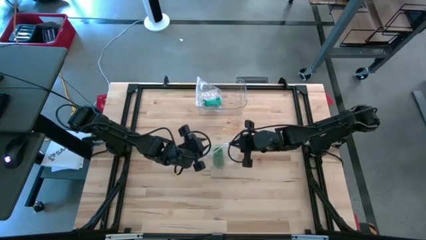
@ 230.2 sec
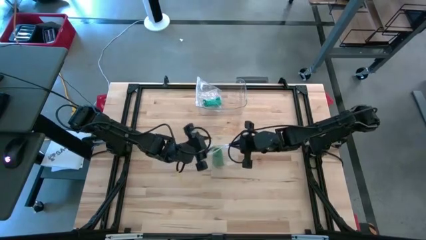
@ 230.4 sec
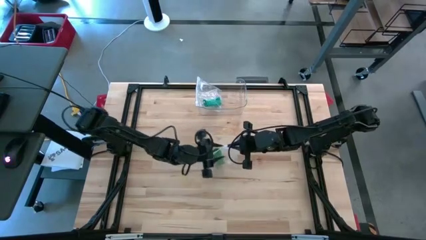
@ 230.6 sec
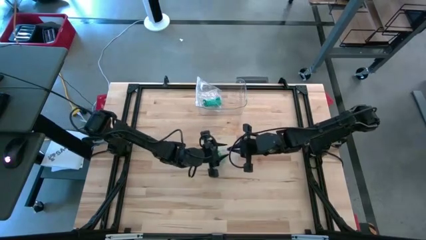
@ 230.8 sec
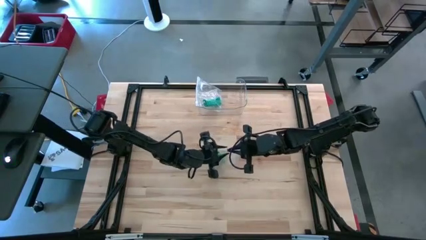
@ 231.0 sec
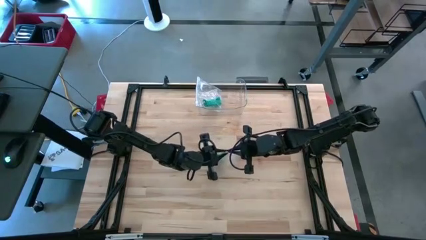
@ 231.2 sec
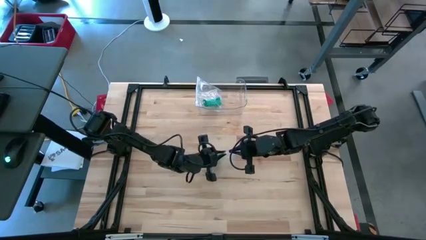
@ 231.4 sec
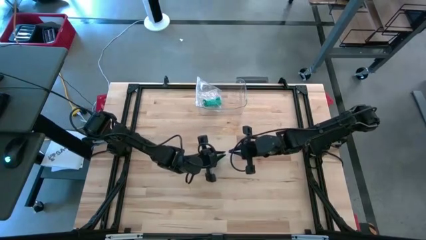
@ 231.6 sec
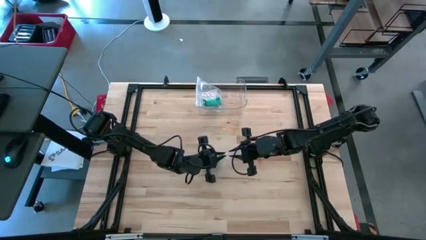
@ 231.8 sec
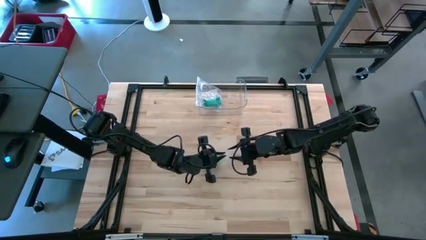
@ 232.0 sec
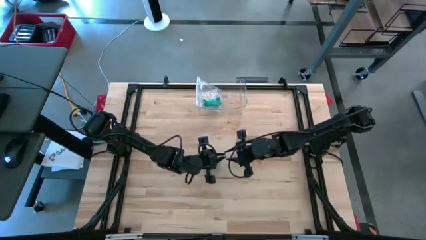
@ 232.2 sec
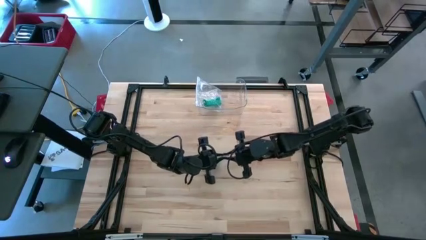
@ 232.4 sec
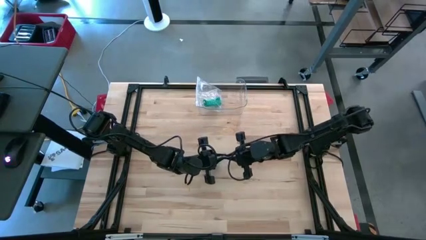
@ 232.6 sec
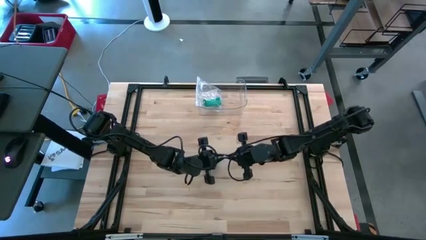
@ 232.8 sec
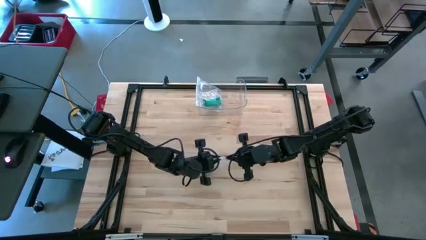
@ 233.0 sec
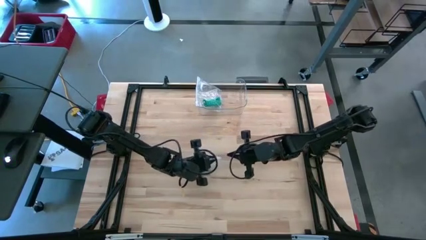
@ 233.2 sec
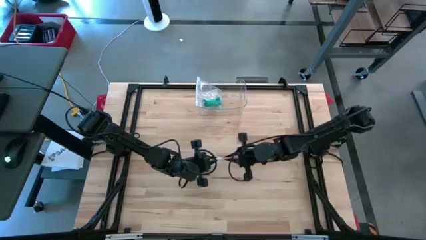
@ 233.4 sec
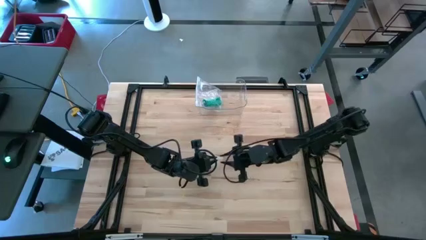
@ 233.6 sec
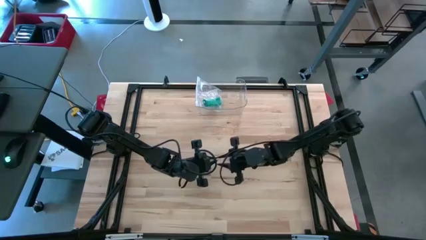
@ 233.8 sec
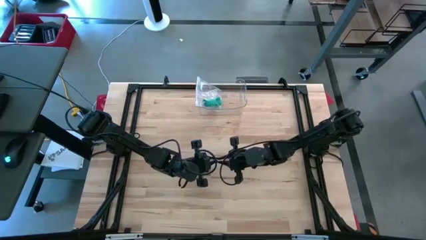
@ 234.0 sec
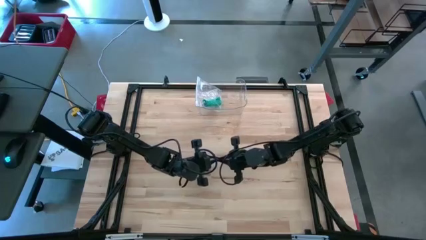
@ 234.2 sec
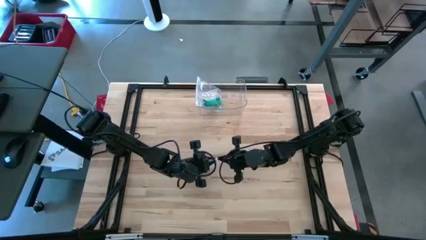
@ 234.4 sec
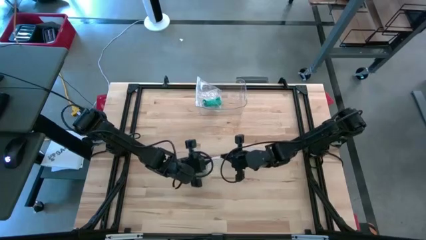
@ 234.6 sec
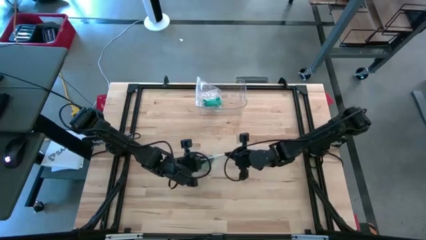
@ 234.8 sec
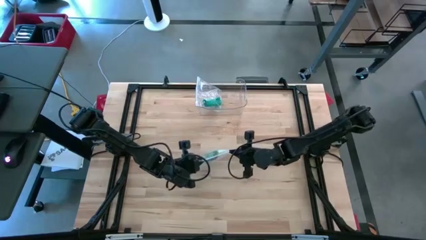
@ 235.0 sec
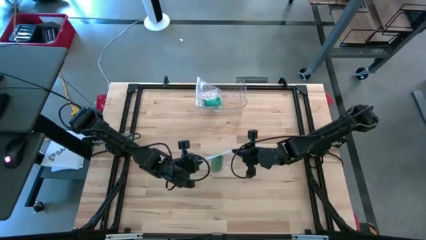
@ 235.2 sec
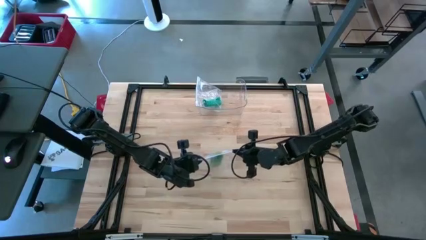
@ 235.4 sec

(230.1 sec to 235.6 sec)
Task: Roll bandage
Close the zip bag

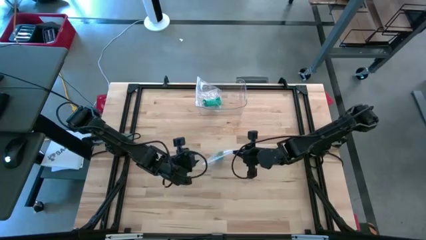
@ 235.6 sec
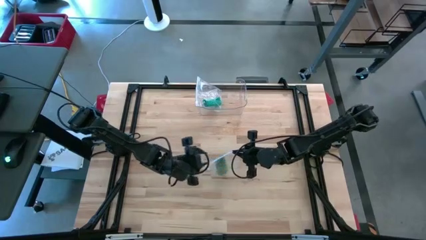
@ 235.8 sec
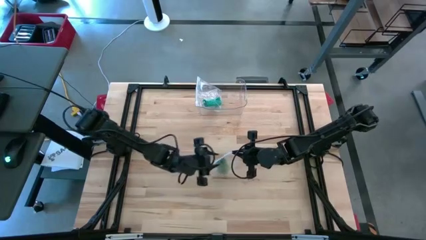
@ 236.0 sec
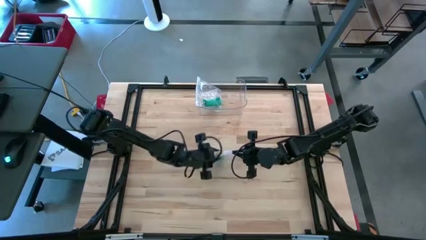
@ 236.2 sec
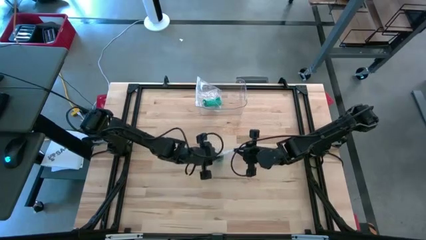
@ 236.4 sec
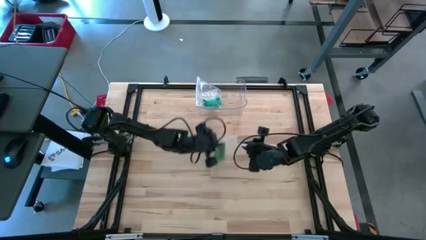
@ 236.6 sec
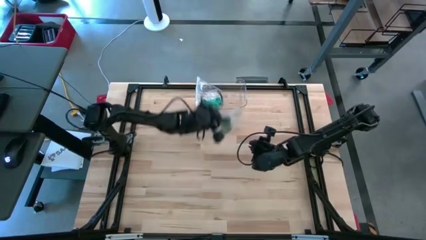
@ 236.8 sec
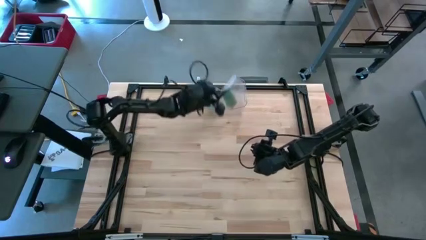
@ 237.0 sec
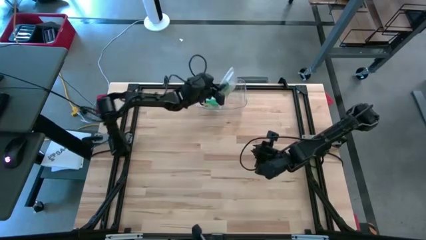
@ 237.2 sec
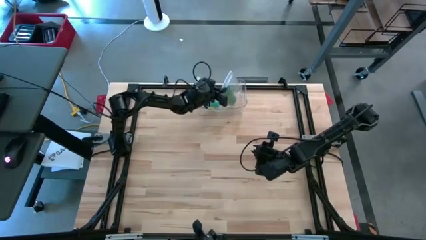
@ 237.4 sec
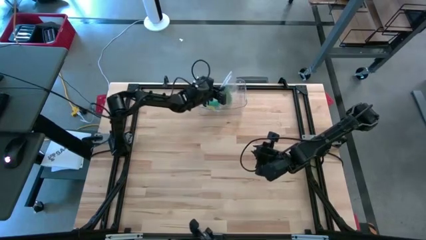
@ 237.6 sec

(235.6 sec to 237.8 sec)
Put the packed rolled green bandage into the transparent bin

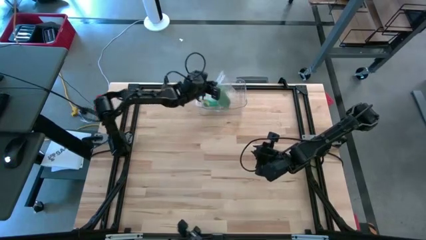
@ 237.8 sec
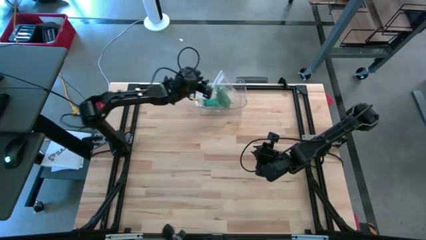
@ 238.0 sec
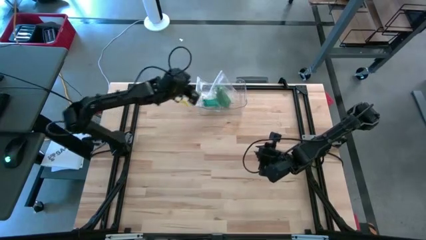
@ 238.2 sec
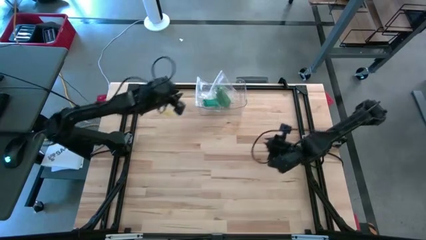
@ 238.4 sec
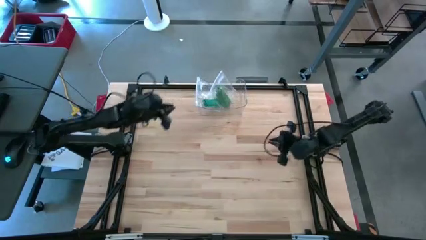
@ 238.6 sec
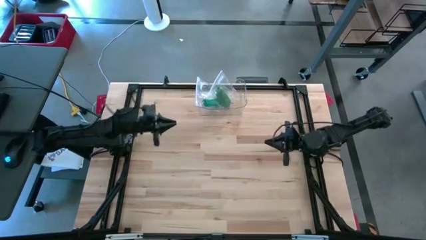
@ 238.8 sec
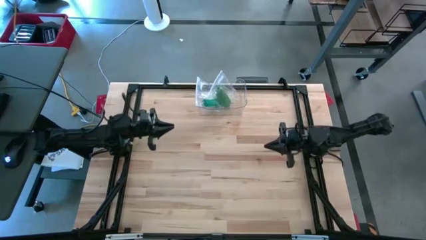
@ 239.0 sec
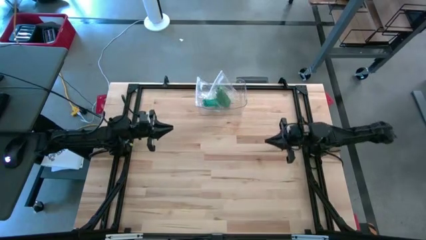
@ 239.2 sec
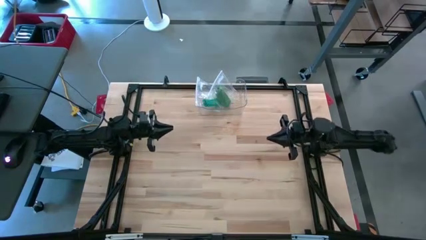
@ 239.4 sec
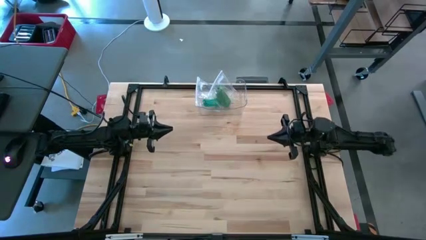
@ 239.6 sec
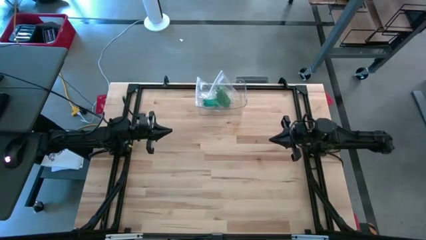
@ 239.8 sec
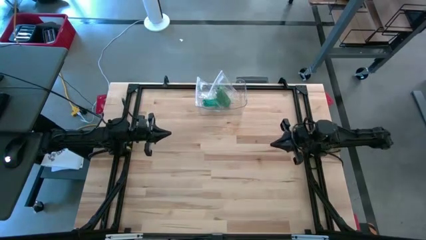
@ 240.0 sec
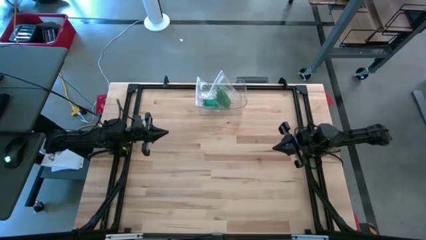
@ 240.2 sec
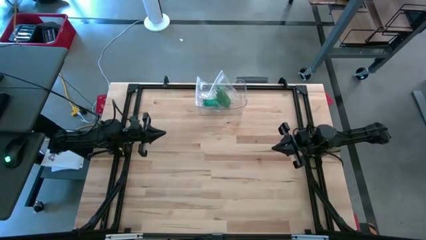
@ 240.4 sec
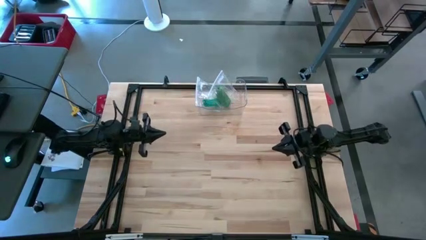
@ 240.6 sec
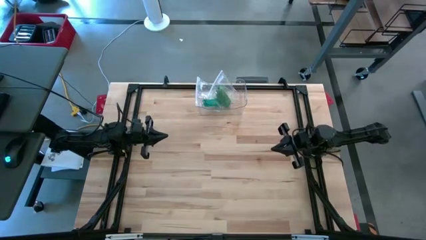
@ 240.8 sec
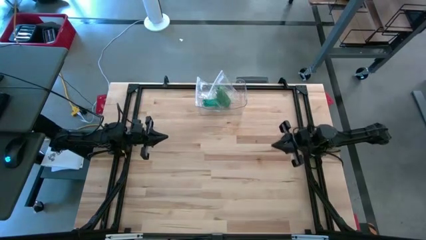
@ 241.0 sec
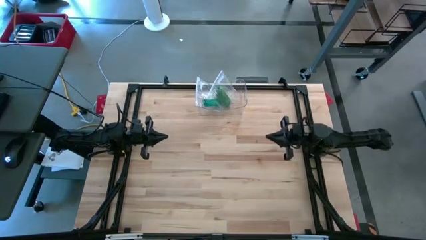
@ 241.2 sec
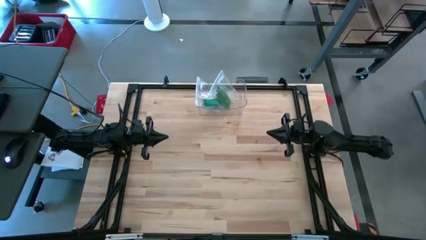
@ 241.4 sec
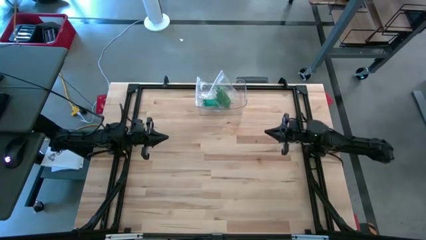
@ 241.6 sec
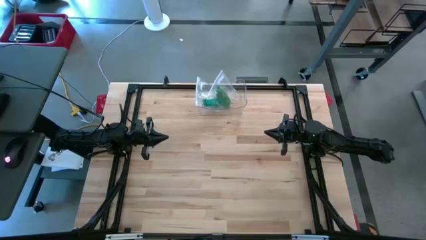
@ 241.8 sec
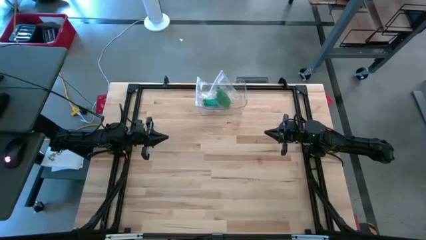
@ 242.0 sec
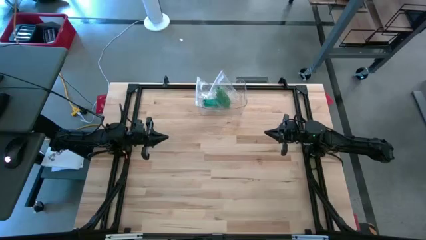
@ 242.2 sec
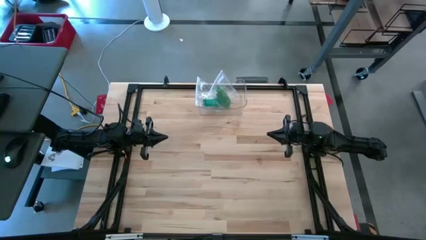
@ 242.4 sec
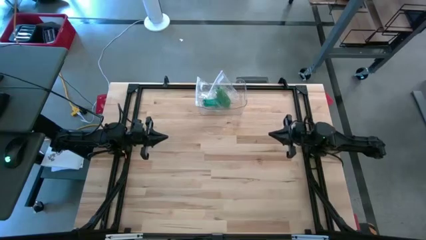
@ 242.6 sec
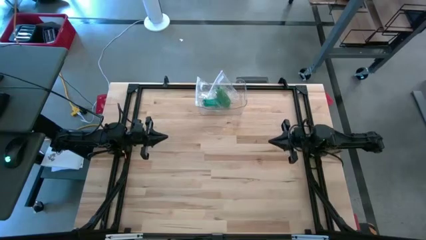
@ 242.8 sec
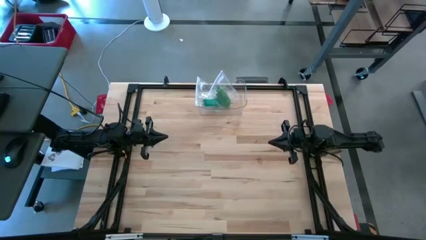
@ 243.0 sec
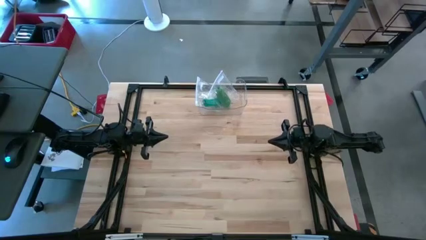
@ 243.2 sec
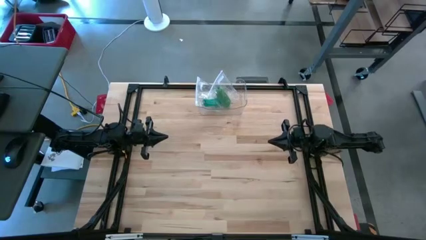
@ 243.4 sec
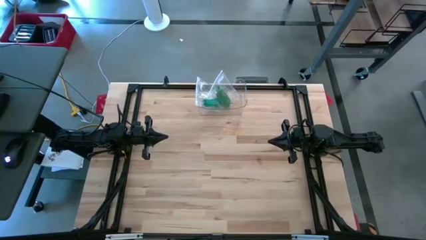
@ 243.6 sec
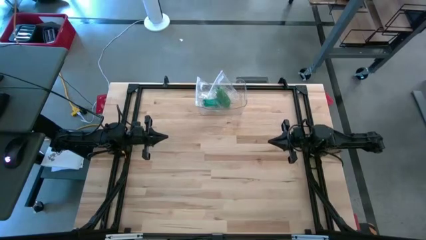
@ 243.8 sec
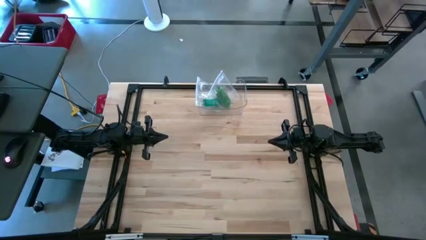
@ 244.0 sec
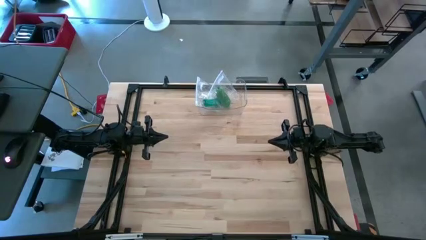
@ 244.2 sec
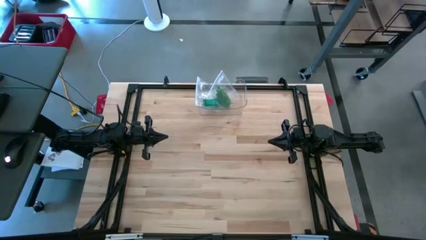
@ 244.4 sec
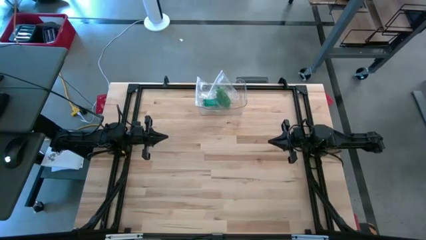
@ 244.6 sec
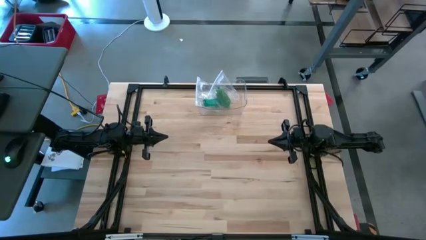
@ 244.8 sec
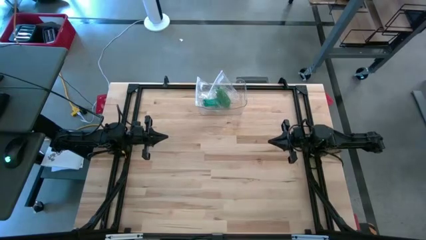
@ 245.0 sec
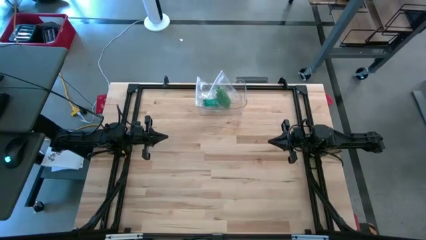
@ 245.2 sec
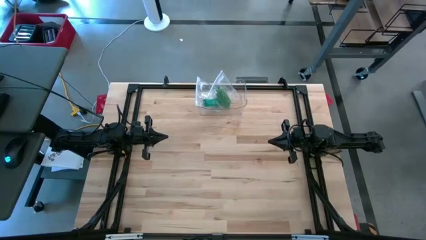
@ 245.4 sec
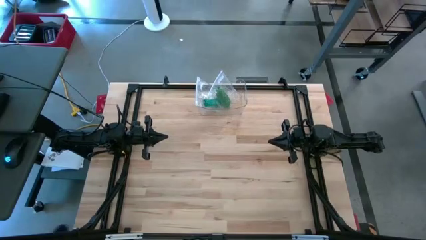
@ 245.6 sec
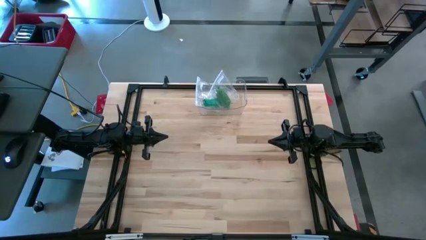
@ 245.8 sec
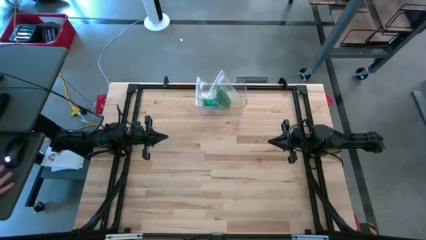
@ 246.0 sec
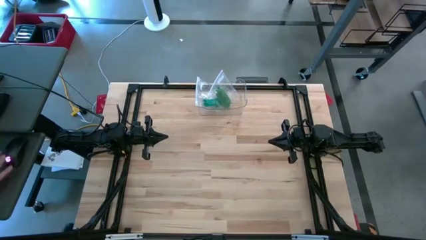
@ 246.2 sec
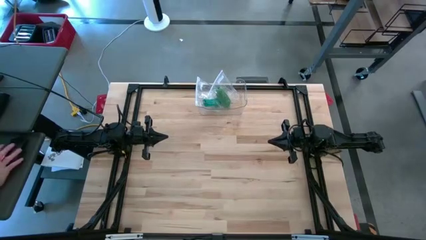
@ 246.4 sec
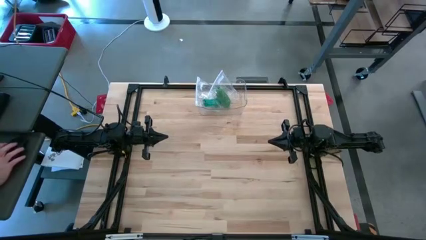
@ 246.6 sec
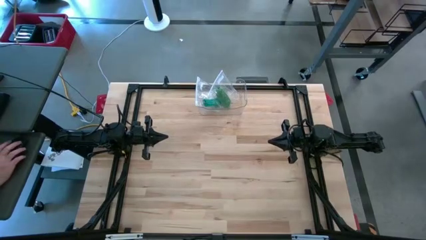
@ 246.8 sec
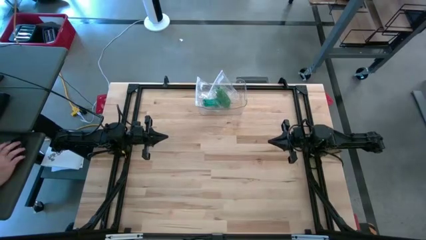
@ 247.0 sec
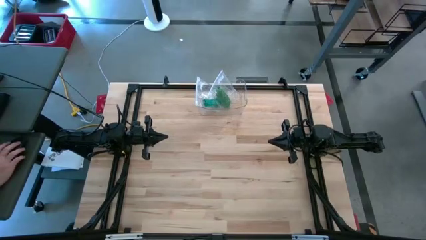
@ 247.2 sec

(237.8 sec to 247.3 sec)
Return to Home Position
